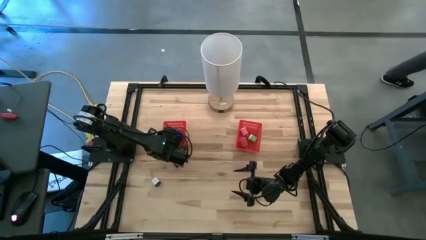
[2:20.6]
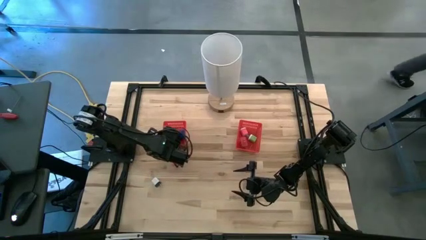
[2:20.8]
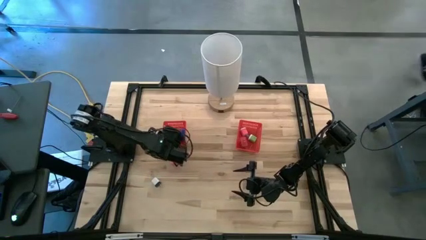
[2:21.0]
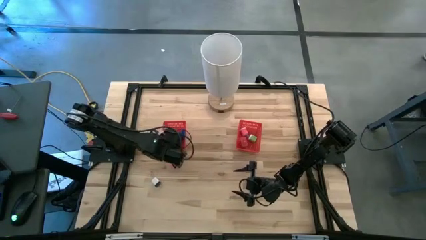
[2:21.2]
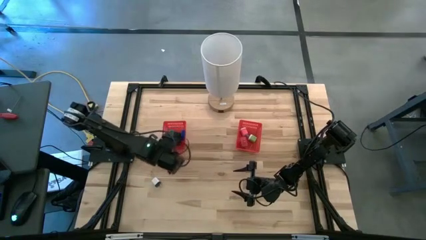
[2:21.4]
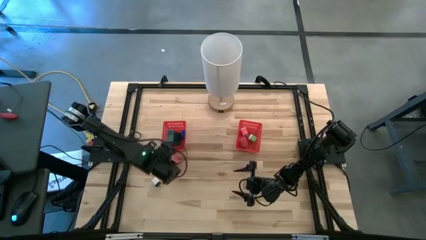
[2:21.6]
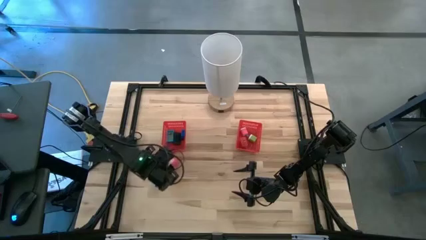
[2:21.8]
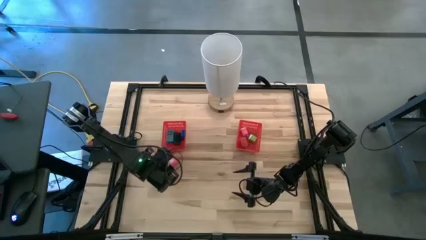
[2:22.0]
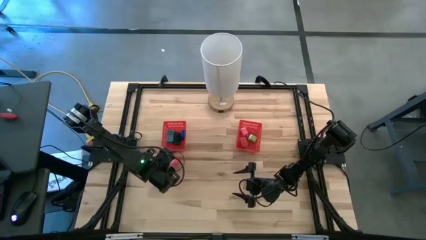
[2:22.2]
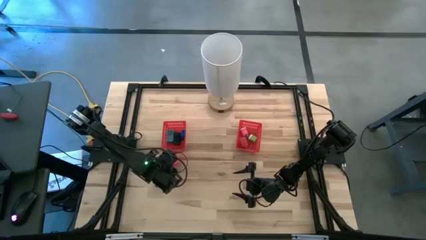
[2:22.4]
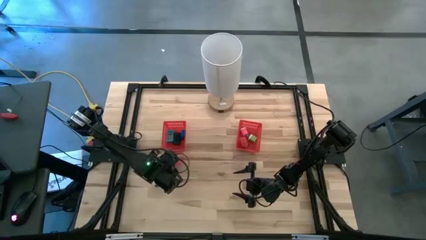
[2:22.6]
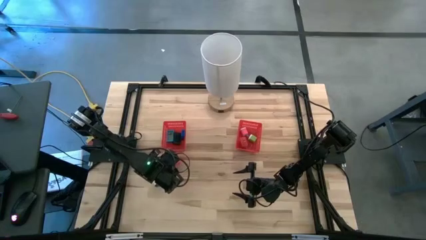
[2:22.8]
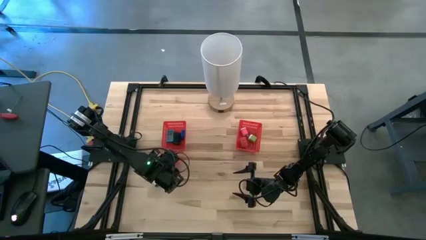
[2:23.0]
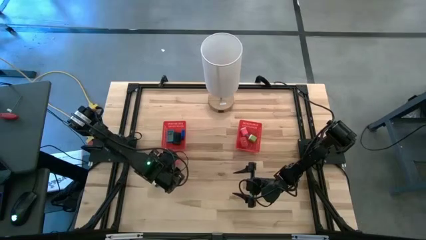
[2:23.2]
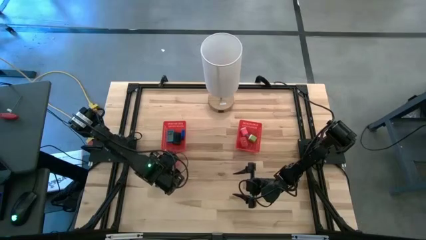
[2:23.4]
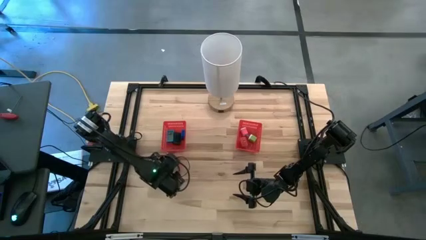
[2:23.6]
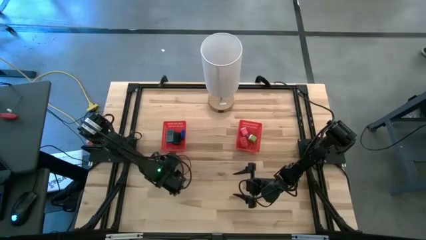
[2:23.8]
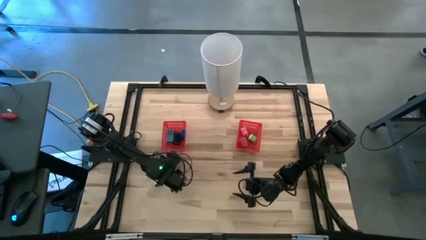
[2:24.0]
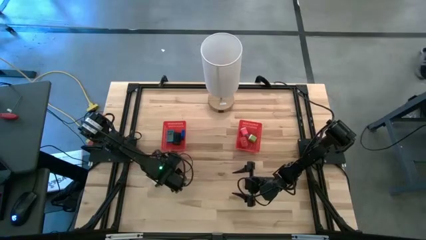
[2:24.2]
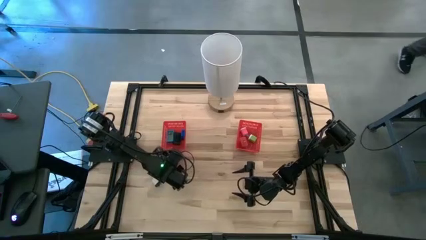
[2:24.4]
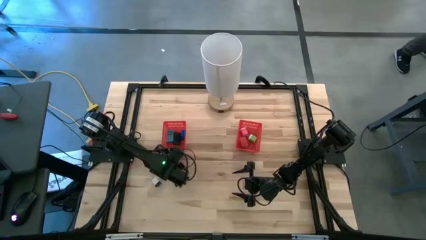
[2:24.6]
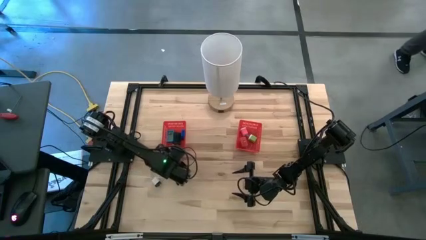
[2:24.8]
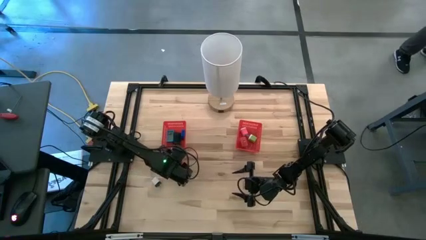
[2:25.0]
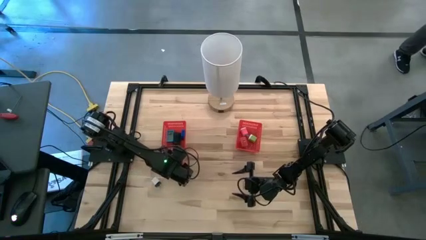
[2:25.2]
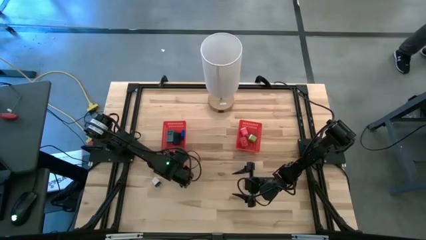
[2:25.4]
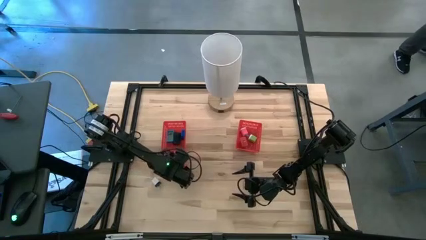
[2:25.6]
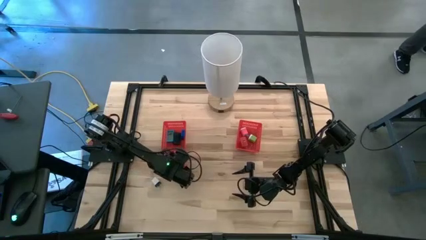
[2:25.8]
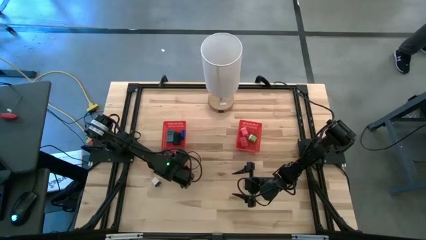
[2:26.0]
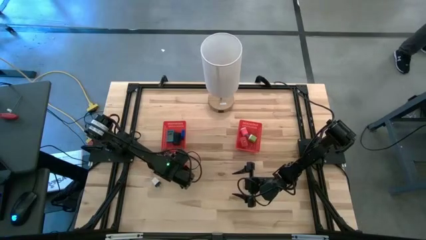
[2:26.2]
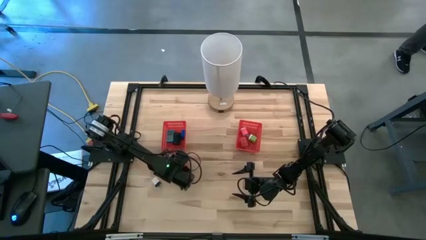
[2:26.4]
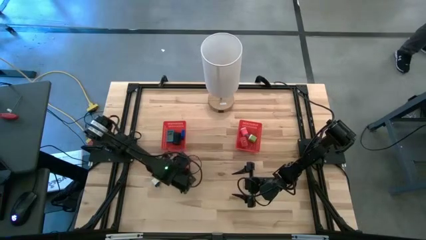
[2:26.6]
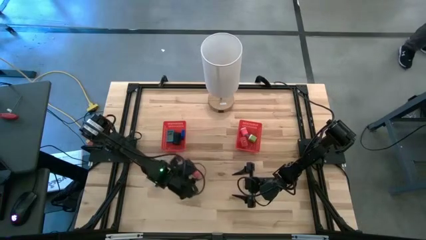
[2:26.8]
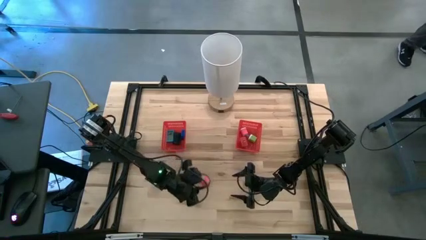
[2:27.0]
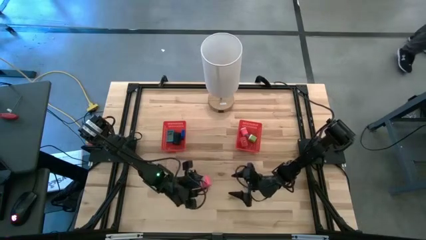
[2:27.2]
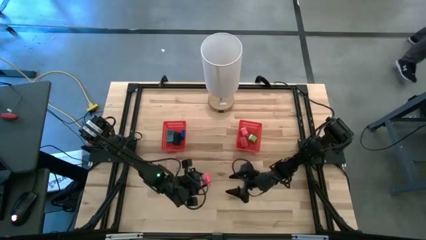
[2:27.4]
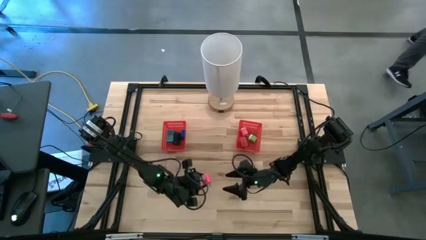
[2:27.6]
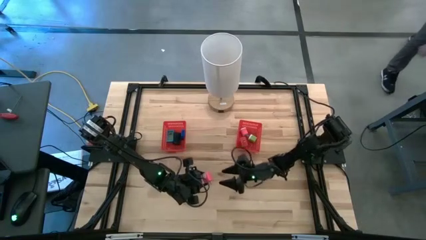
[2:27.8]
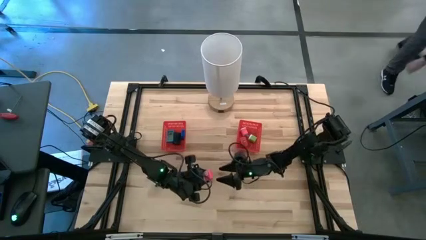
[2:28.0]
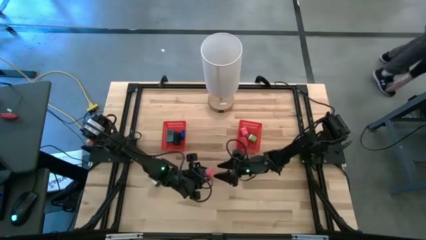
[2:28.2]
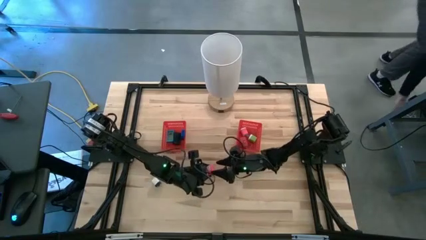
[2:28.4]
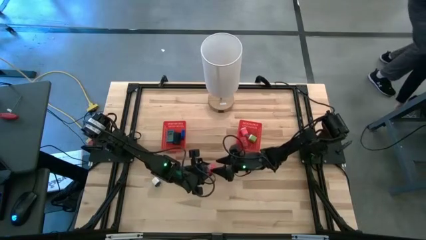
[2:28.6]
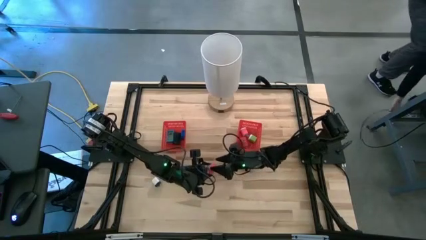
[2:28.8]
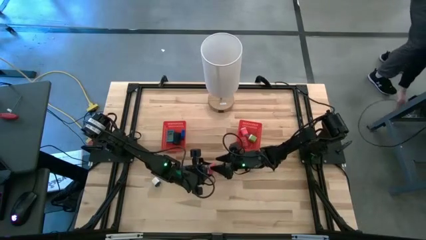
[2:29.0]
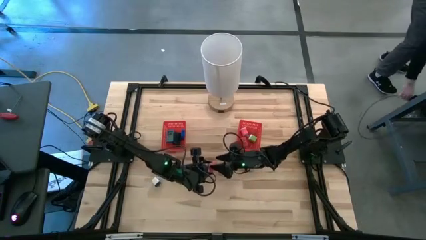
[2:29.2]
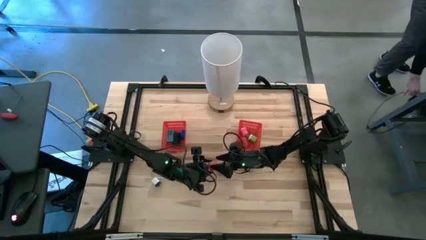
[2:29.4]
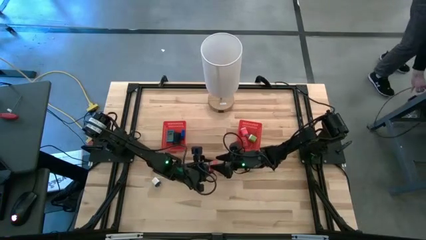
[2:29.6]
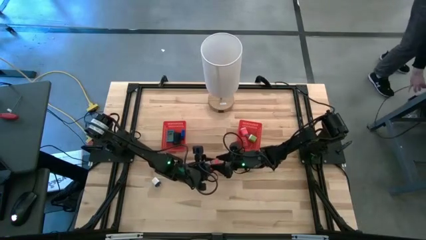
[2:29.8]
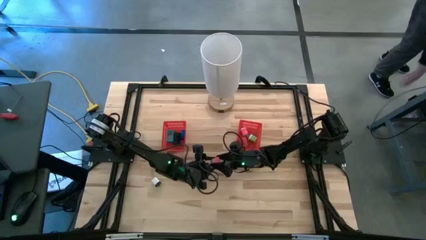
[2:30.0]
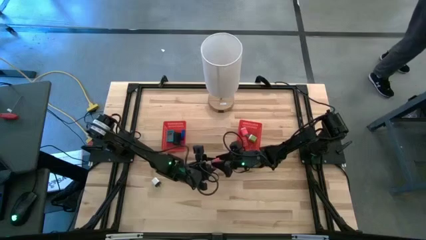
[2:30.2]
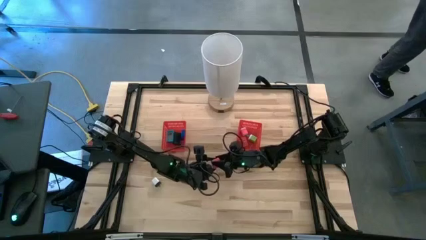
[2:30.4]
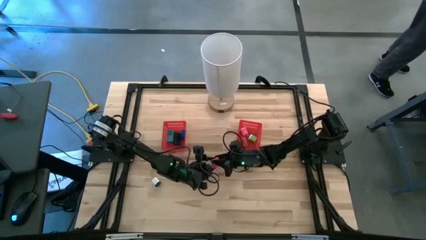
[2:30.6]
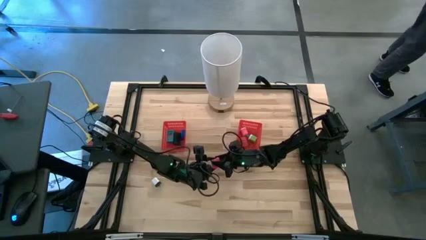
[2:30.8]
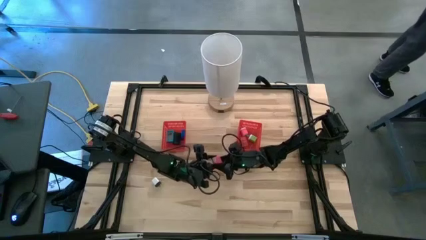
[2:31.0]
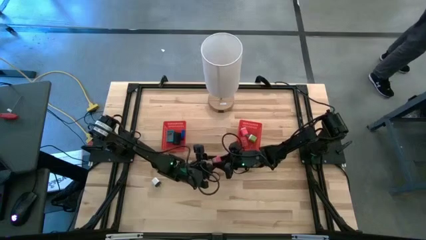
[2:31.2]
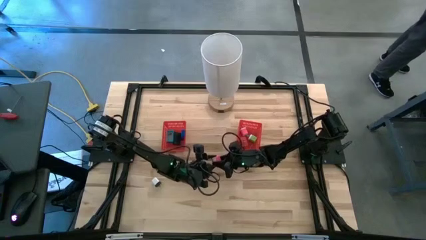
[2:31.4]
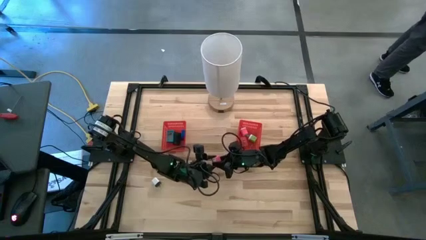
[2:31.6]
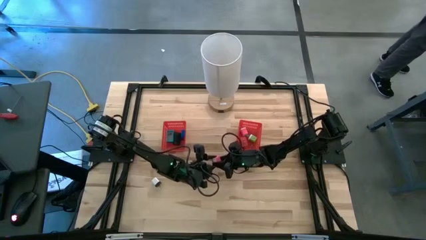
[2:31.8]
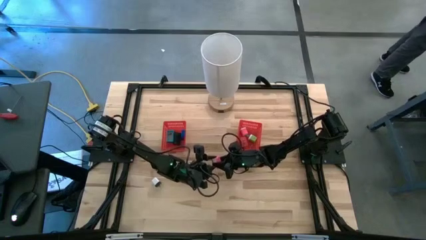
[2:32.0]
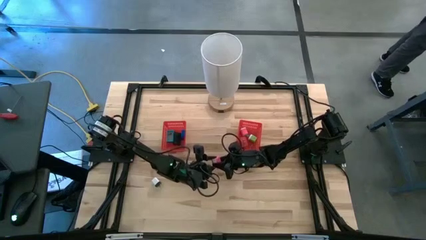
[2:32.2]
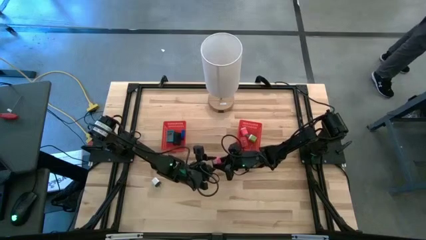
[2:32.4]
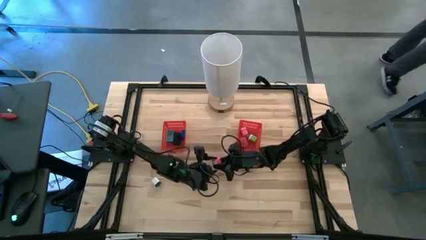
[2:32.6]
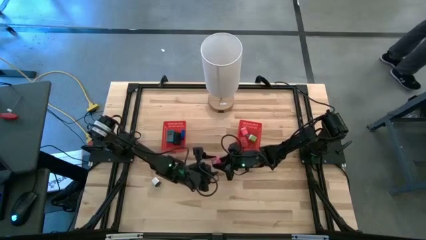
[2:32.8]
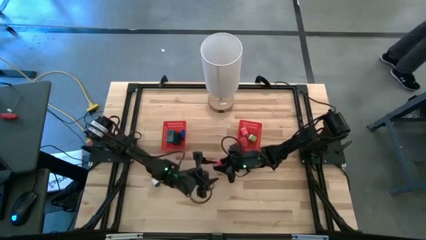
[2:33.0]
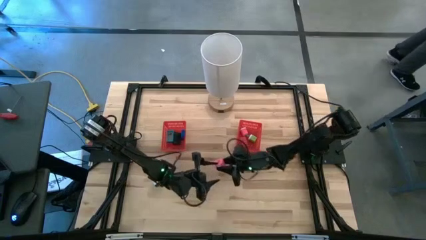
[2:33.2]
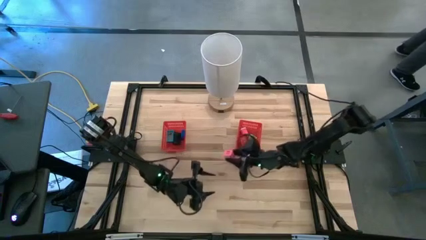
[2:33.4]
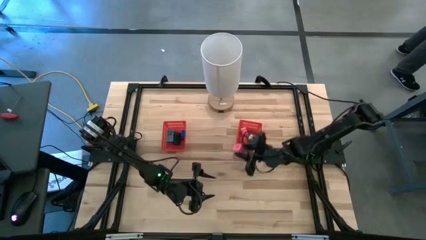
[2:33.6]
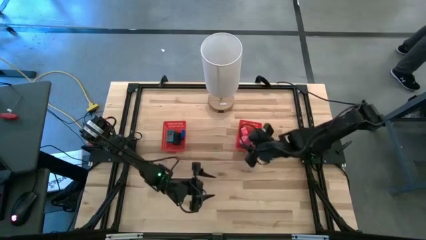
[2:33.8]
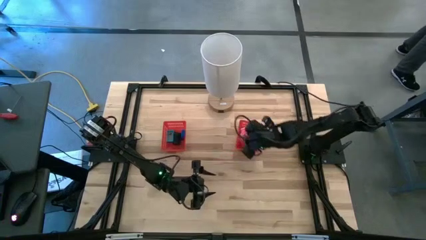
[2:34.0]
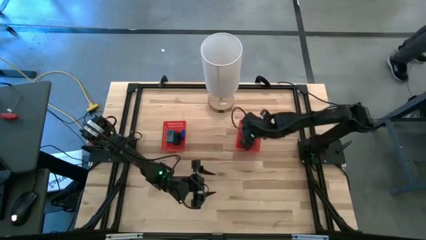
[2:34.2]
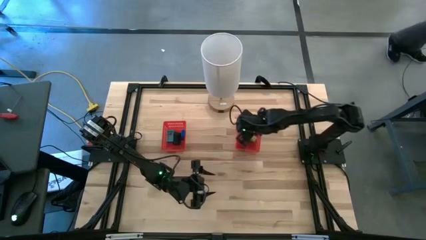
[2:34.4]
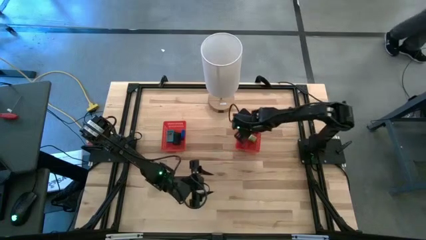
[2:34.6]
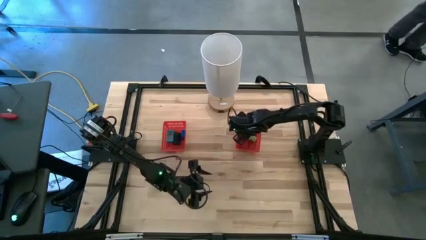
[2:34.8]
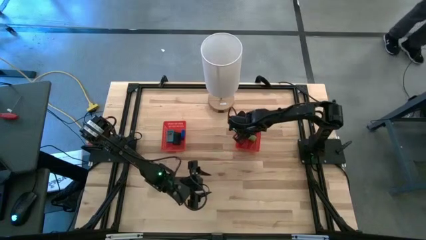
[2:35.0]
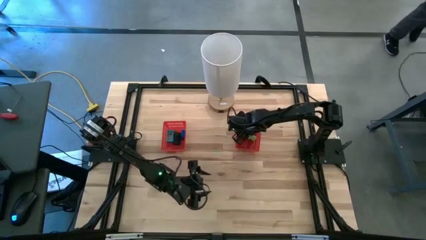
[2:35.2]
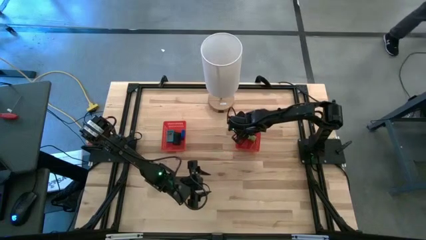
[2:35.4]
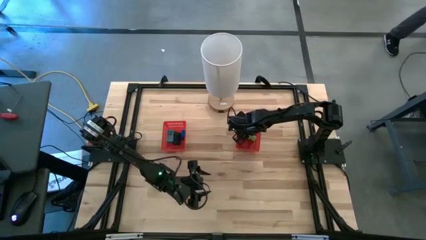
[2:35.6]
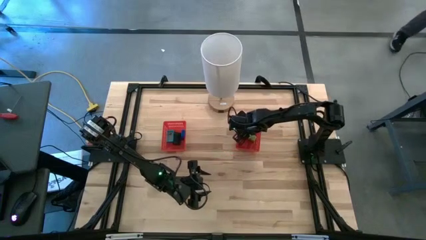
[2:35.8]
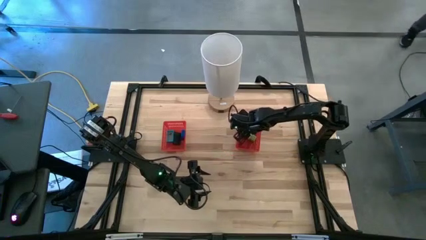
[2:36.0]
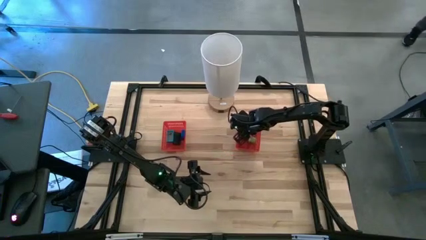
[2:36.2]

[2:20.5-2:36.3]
Task: Pick & Place Office items
Put the pink charger adapter into the right red bin
